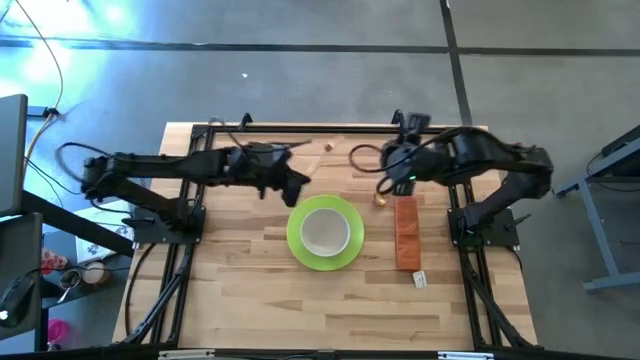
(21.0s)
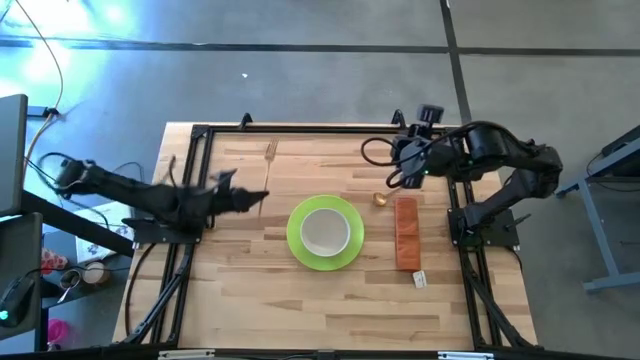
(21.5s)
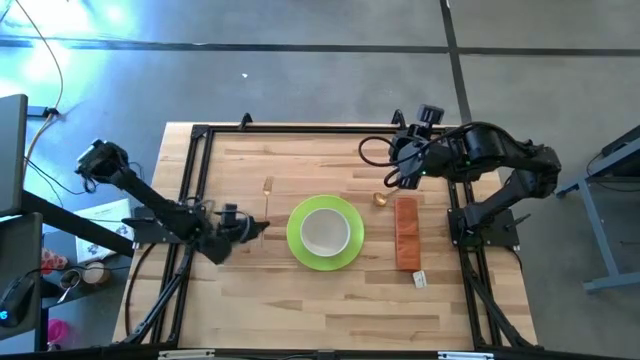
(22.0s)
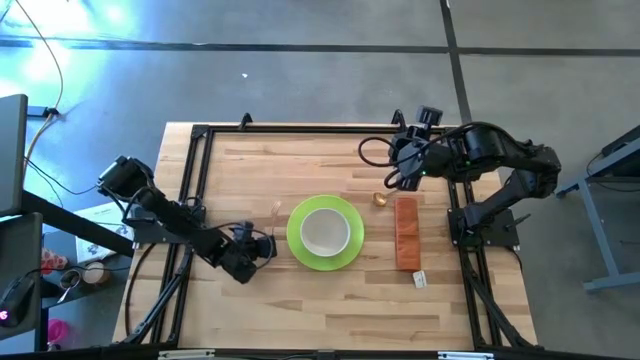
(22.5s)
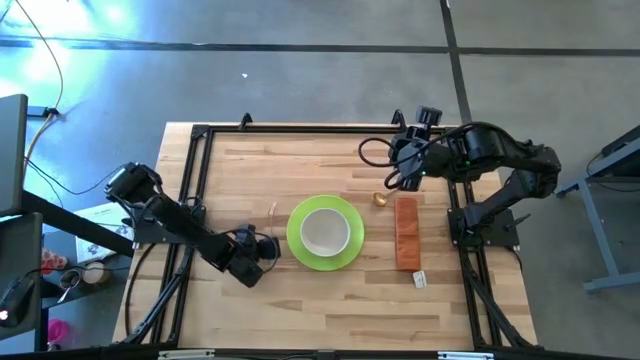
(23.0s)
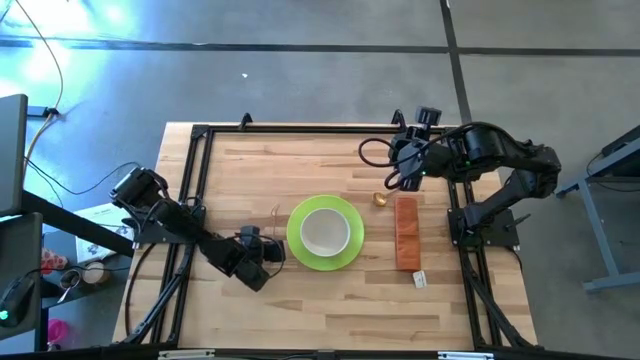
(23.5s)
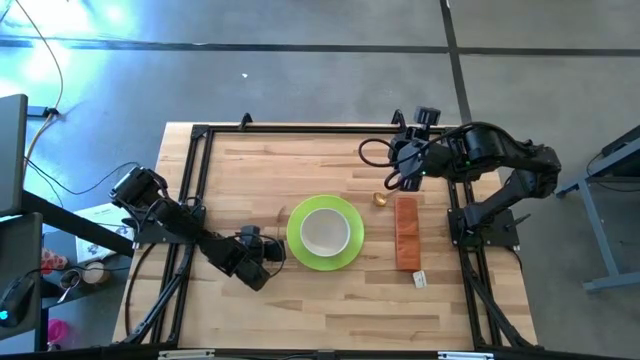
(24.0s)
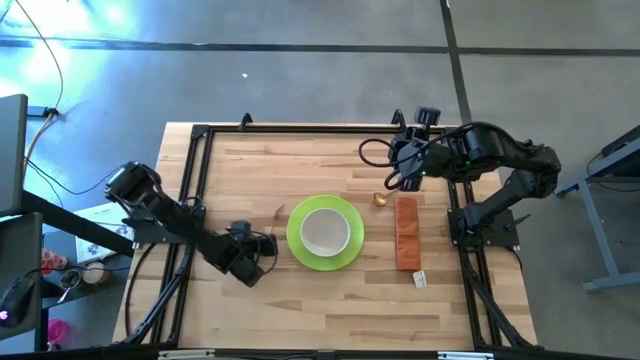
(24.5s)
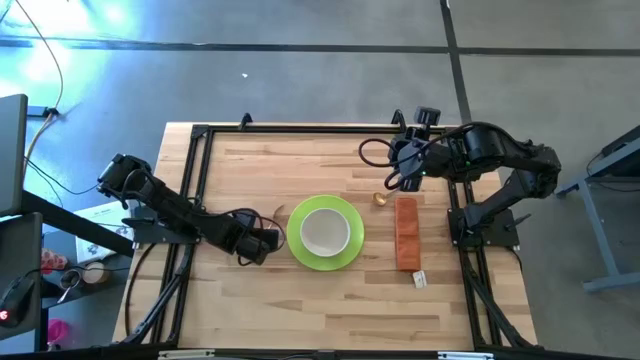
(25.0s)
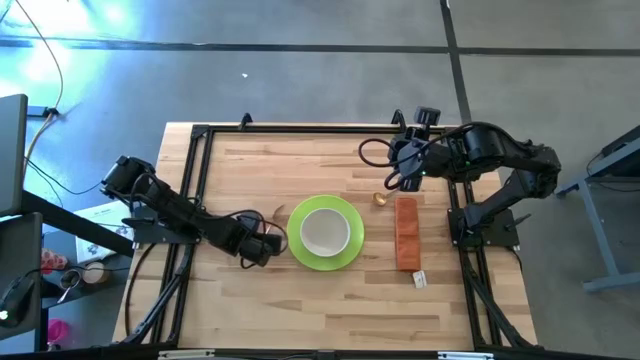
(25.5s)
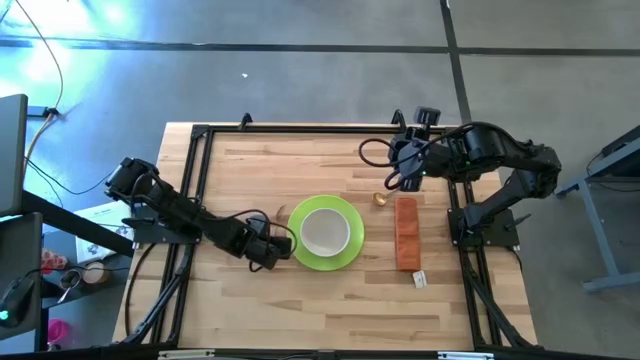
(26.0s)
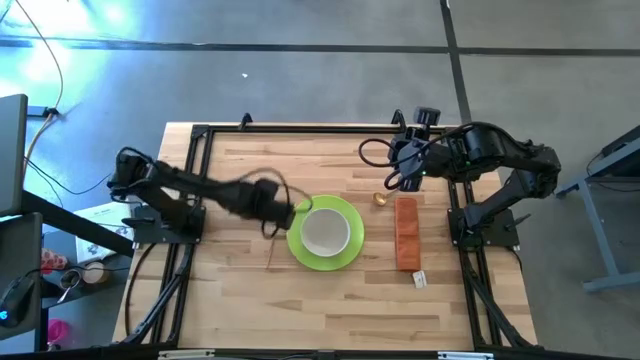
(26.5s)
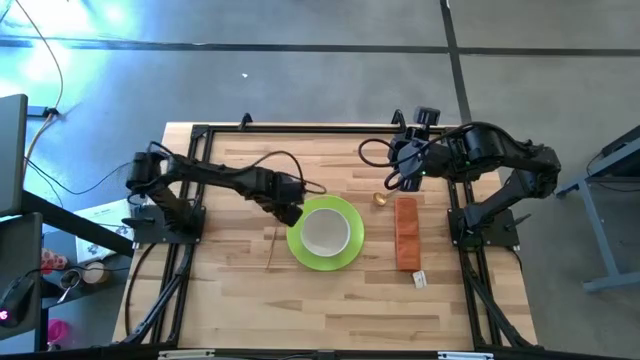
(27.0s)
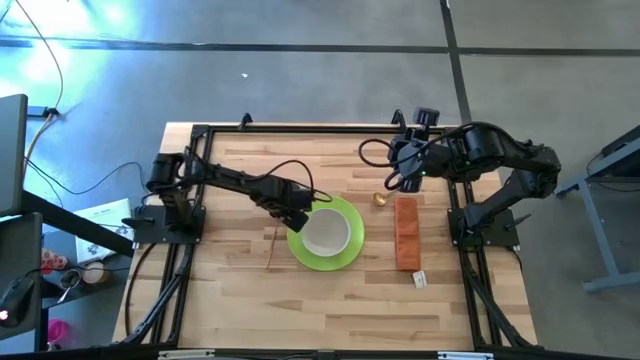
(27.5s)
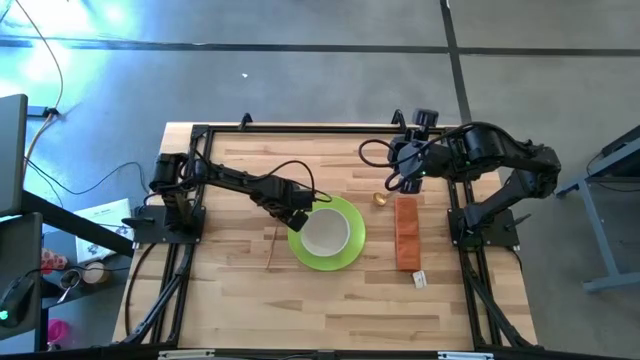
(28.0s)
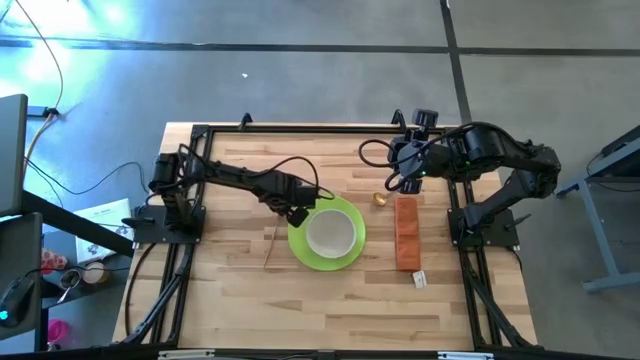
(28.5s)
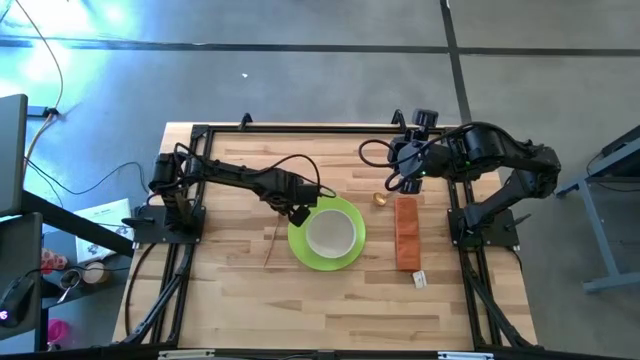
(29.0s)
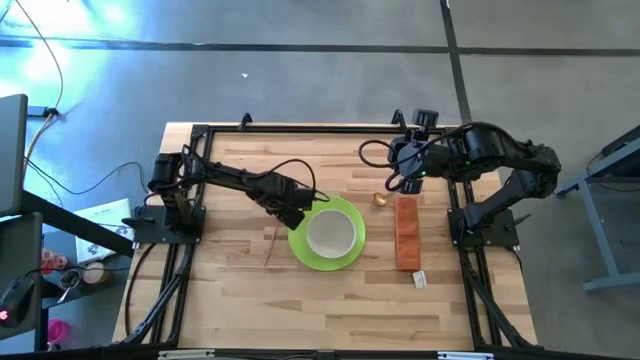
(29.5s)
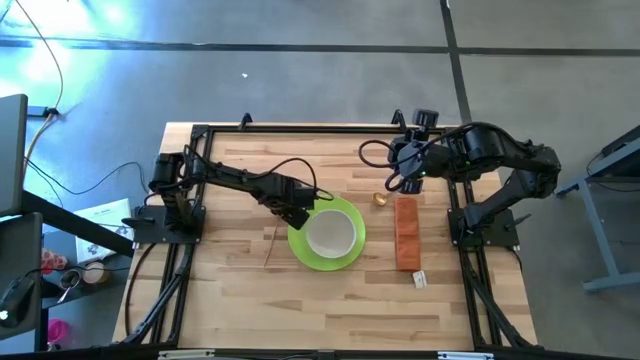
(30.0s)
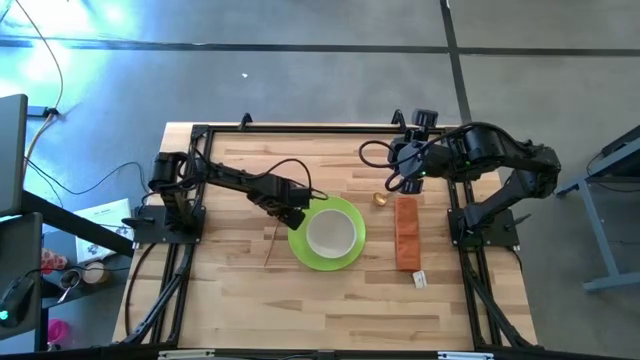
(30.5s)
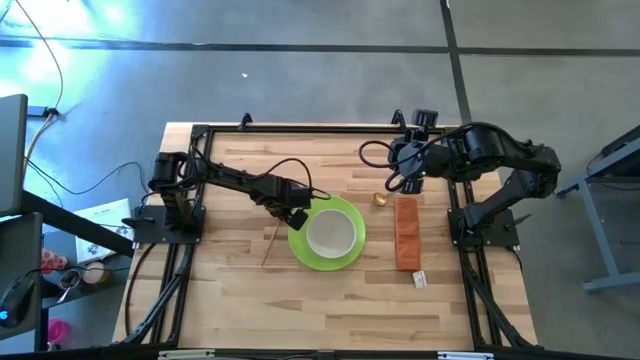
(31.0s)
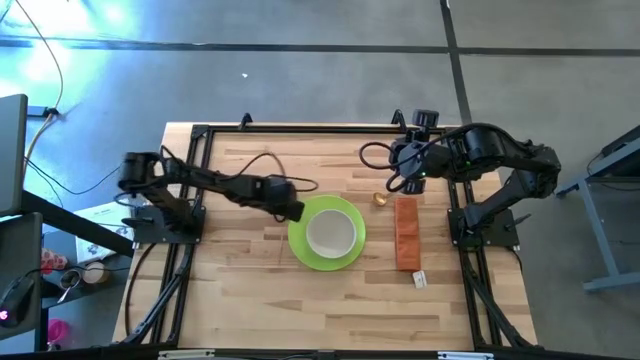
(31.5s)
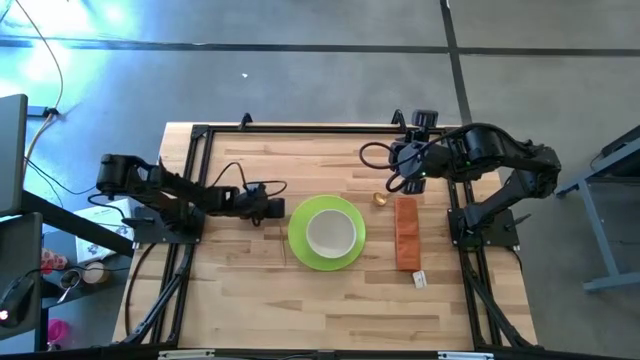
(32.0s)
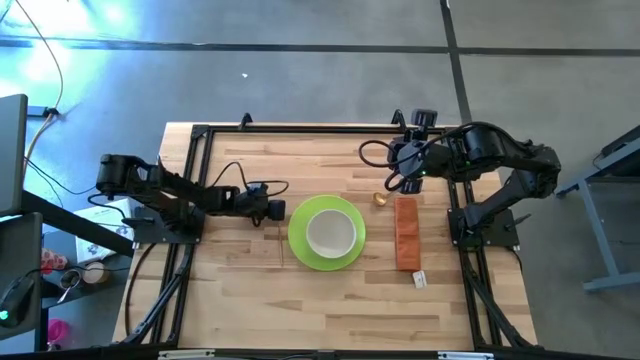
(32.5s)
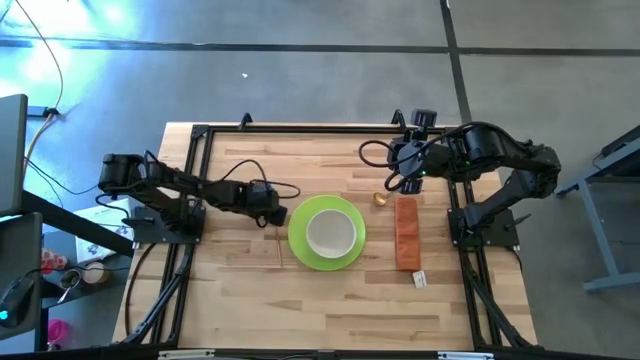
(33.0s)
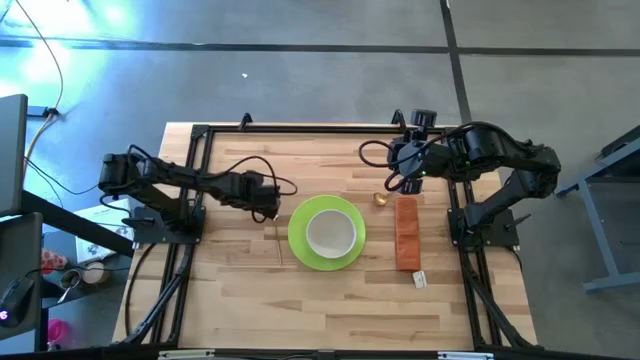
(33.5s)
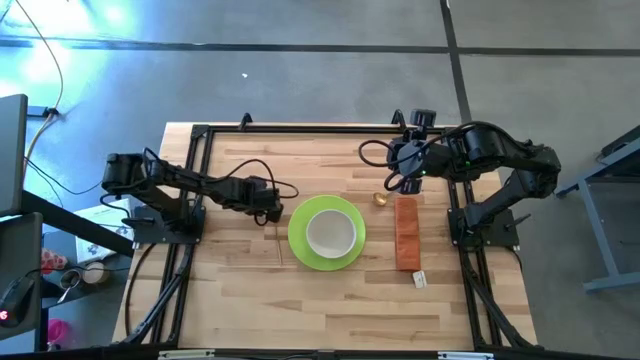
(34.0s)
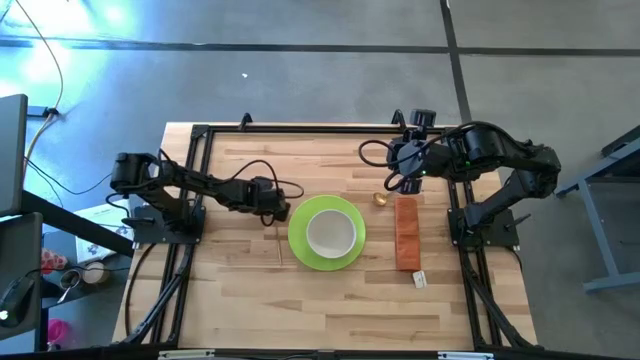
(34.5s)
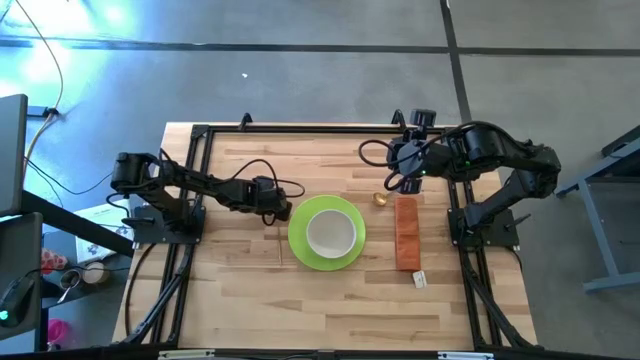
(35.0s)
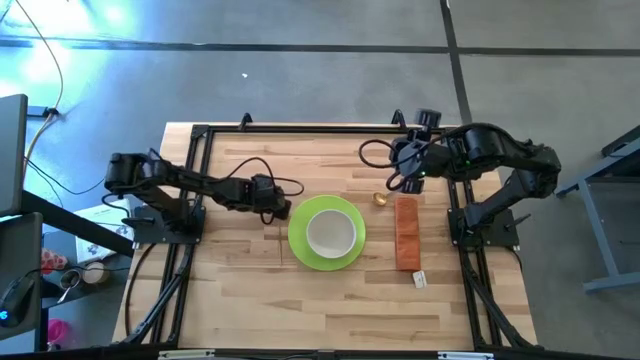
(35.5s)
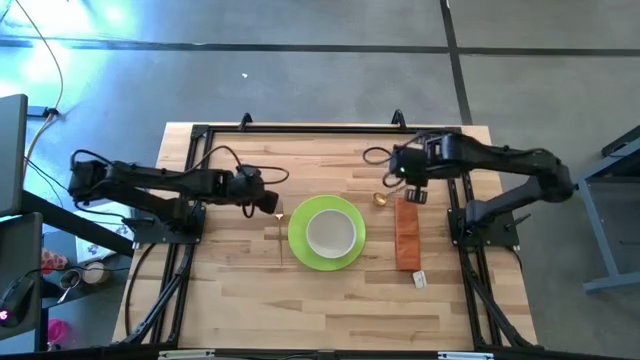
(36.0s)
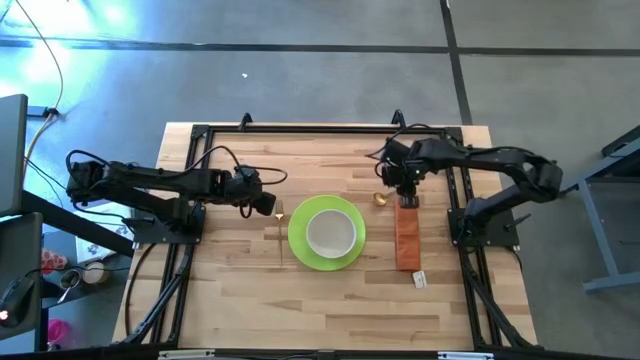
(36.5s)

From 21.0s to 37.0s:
Task: Set table place
Place the fork to the left of the green plate

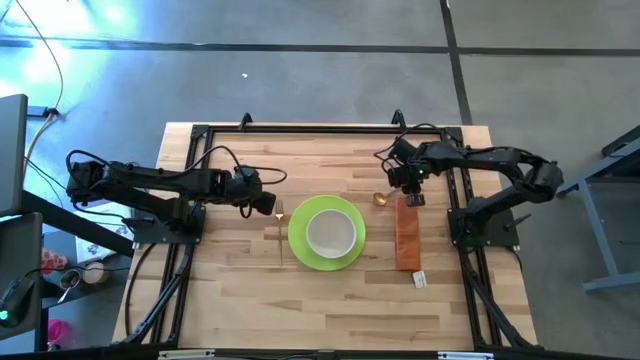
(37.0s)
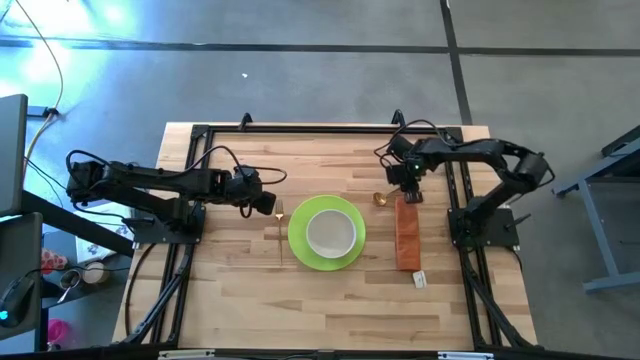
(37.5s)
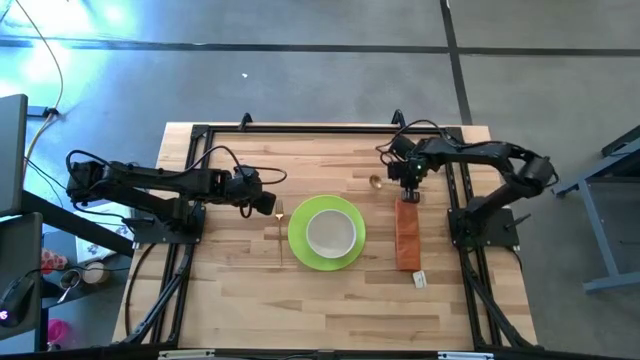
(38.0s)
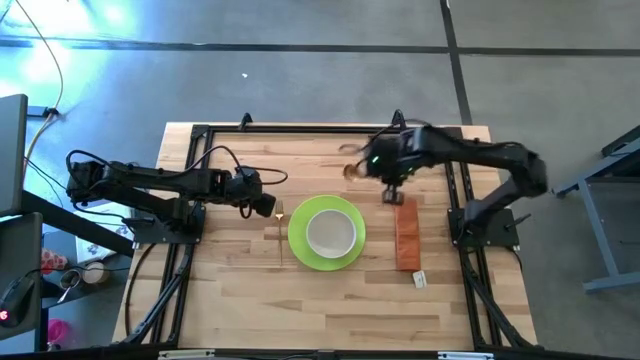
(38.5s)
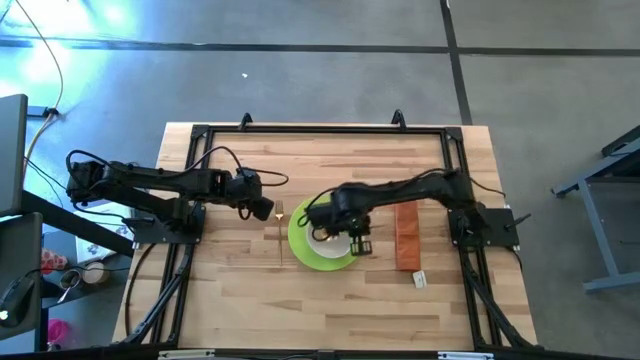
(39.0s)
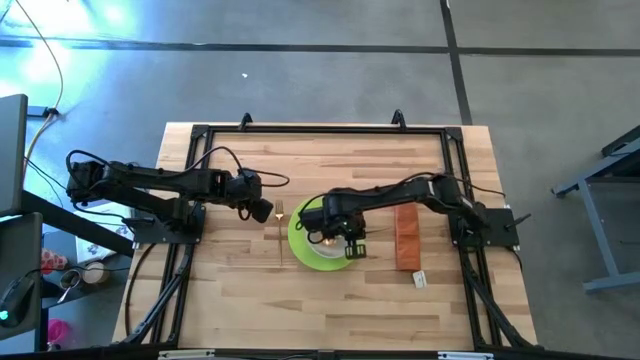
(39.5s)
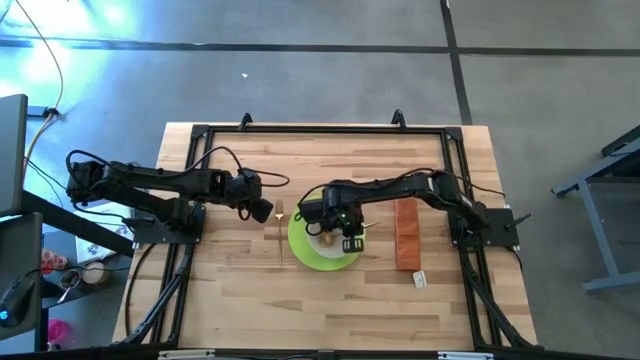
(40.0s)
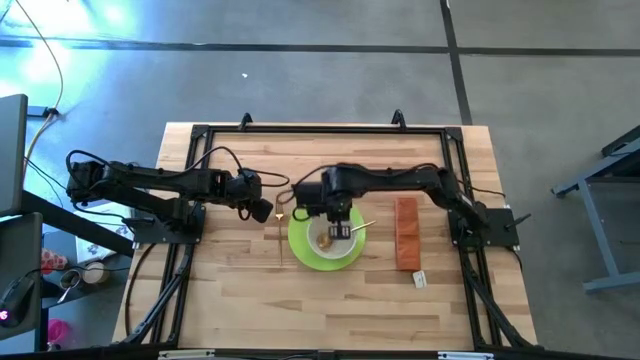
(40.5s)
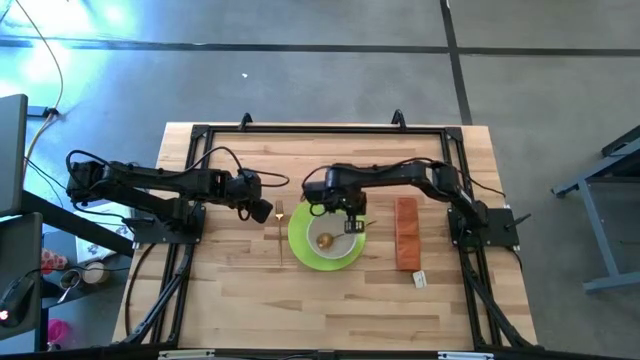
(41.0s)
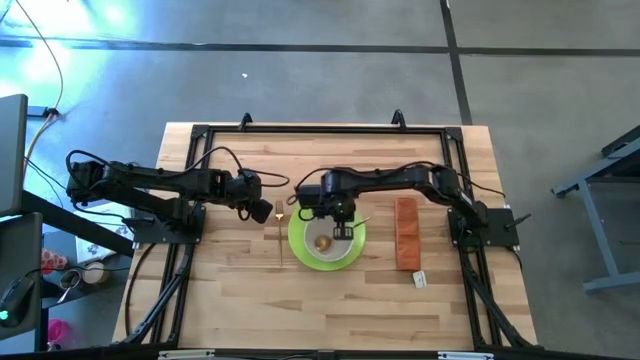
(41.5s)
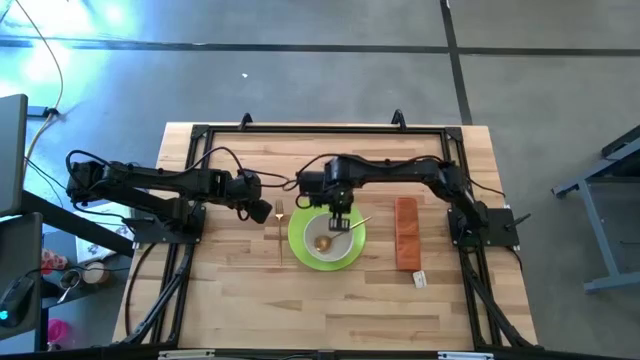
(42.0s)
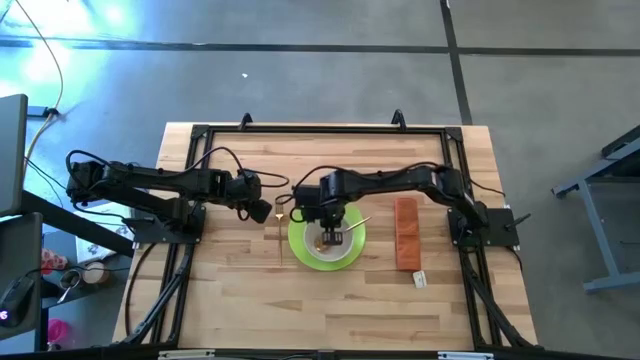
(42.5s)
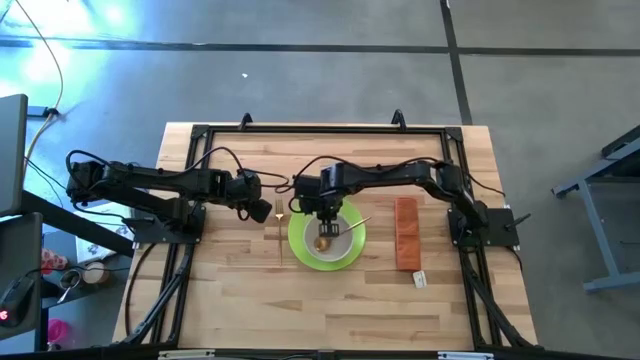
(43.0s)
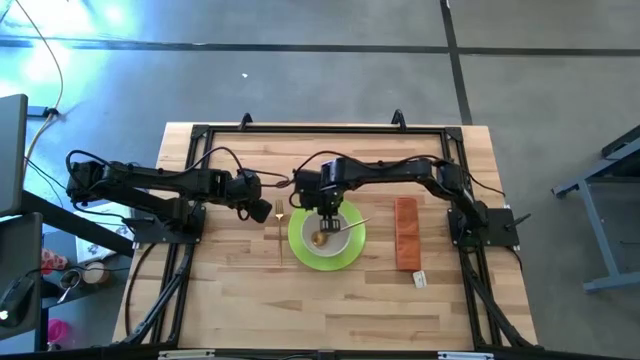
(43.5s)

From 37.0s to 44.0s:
Place the spoon inside the white bowl
